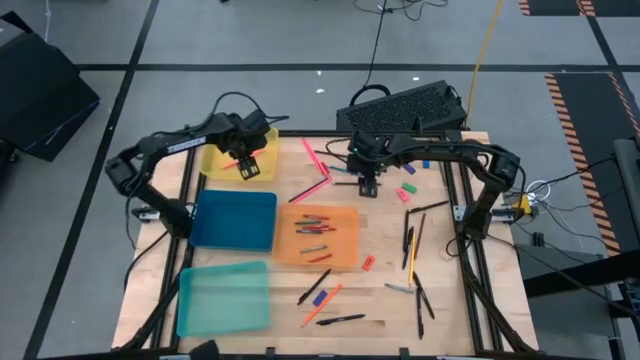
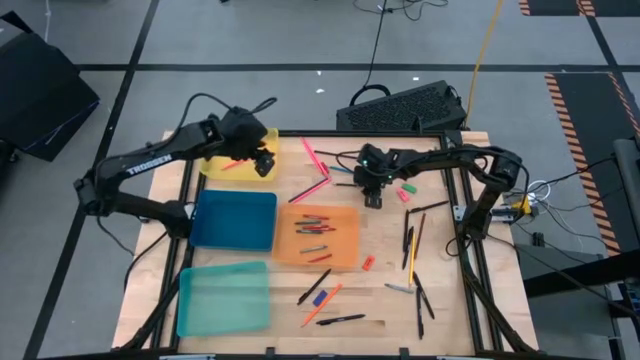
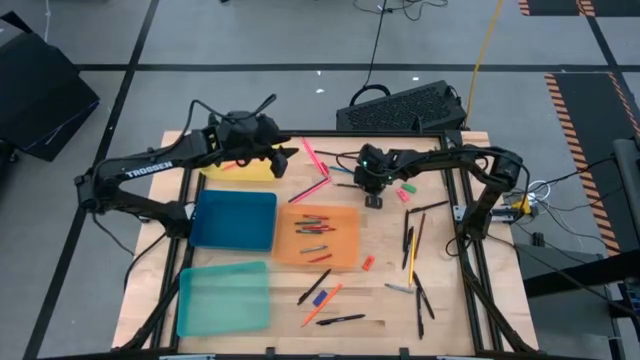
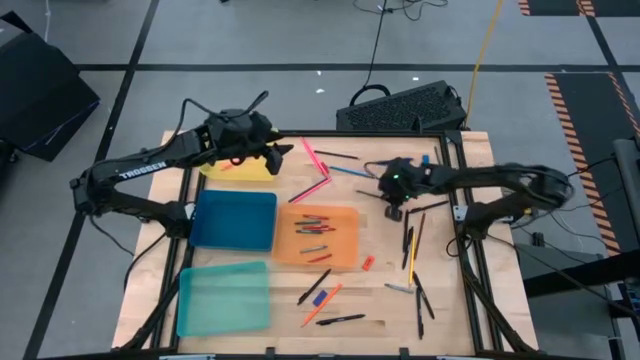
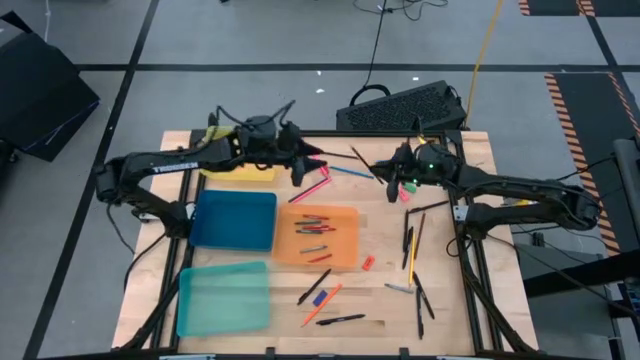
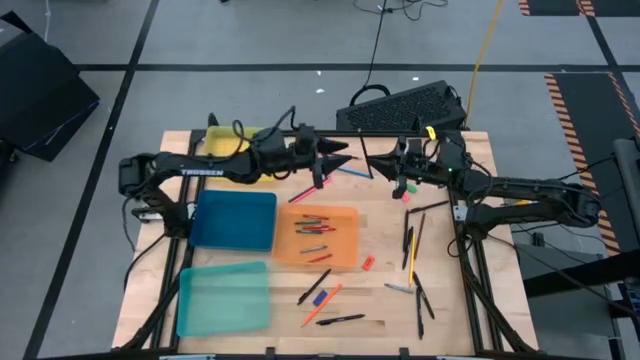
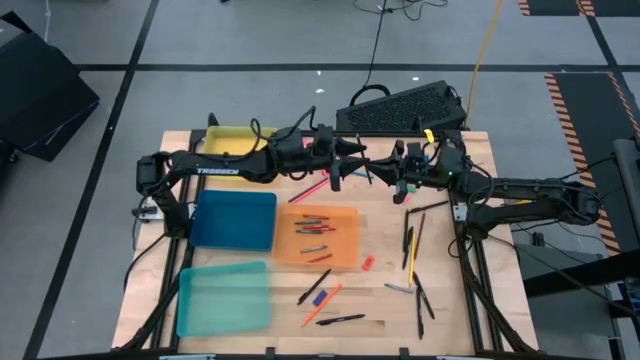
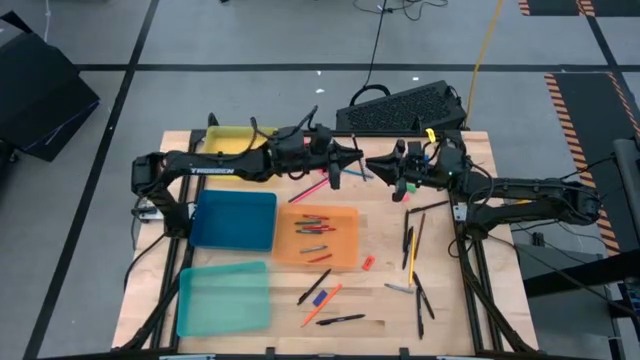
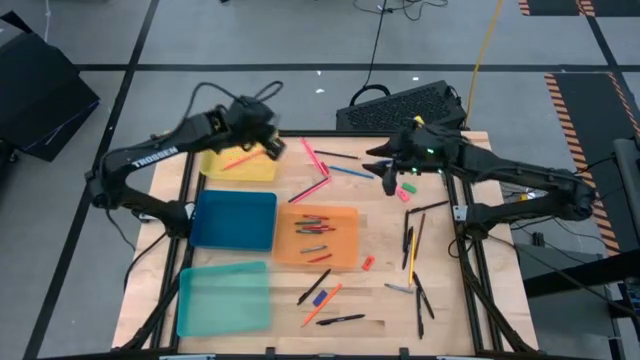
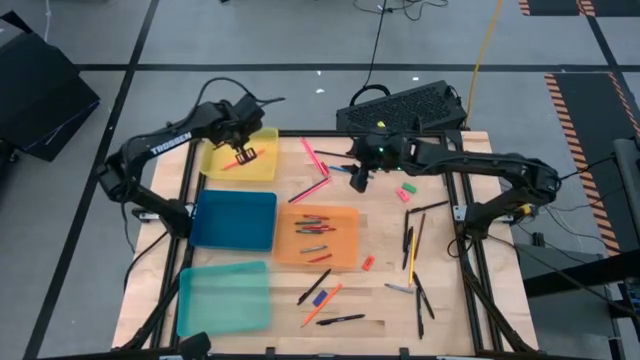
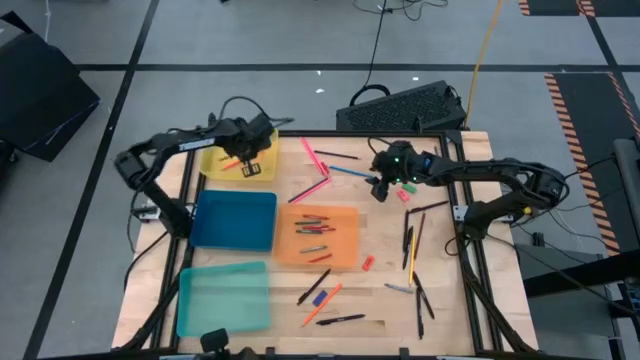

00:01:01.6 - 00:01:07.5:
Task: Sort crayons/erasers/pens/pencils in bins
Put the black pencil into yellow bin

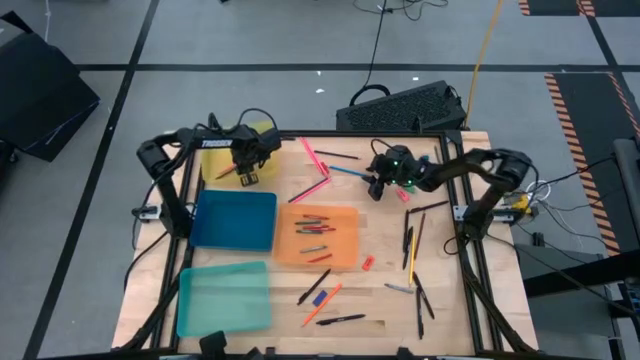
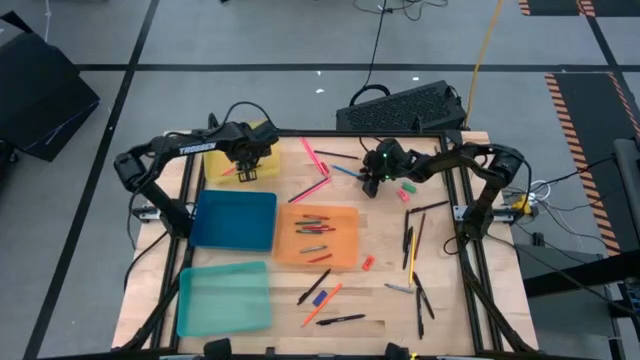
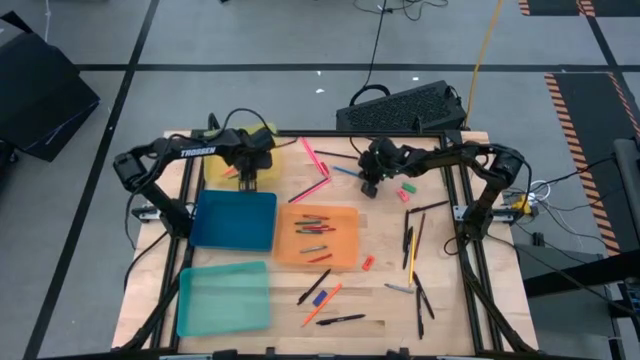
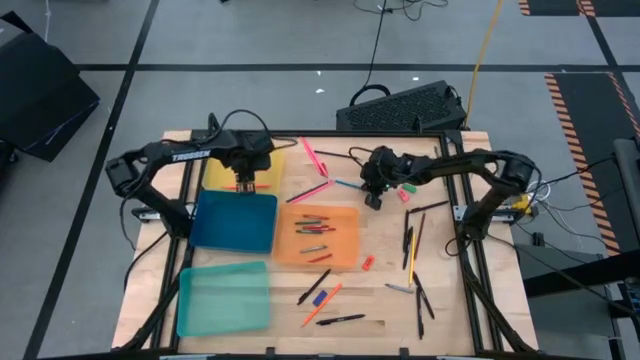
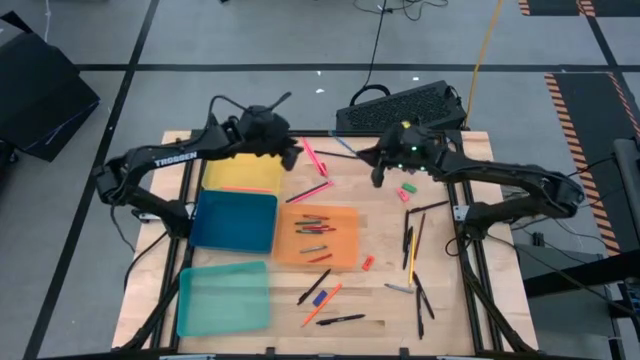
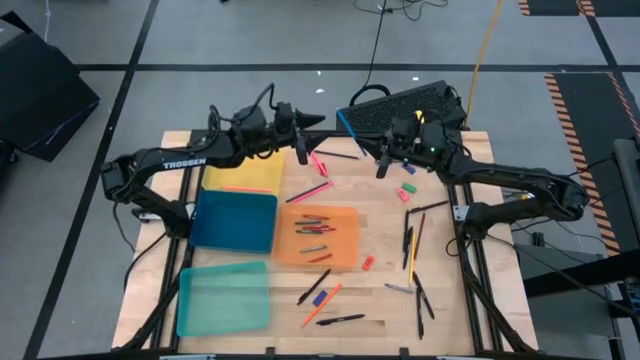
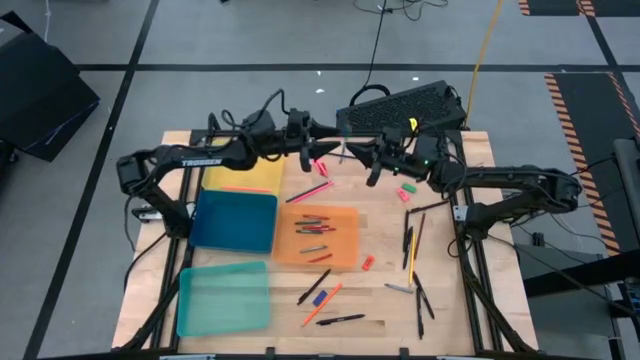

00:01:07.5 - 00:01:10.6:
Put the blue pencil into yellow bin

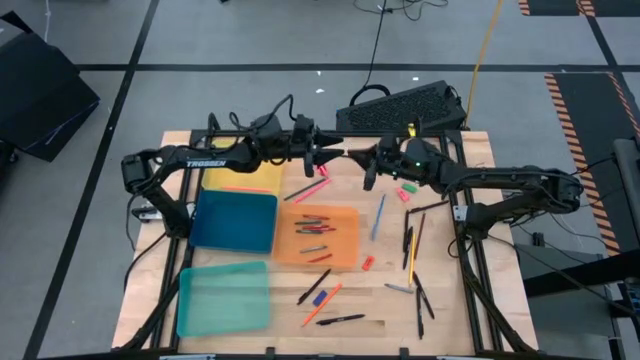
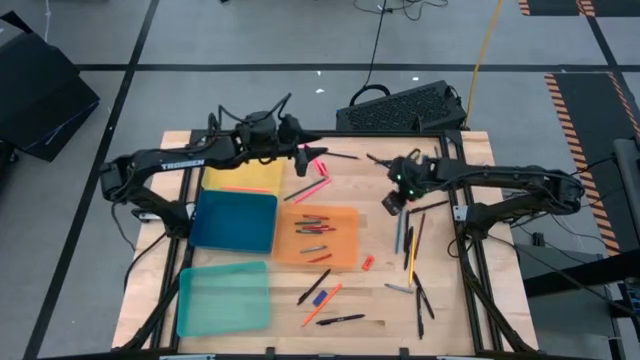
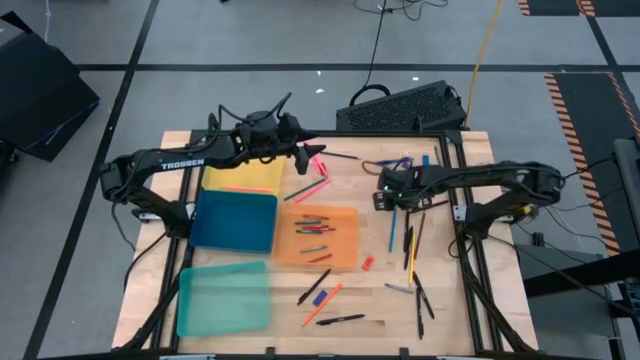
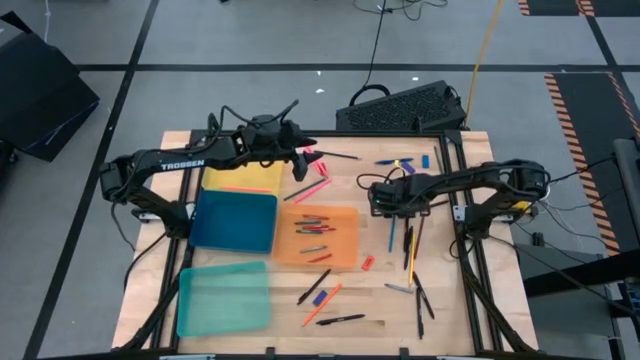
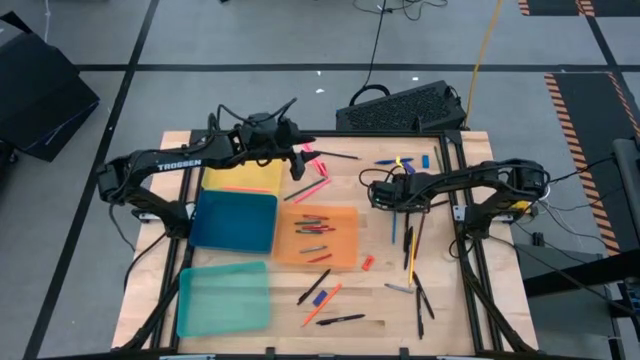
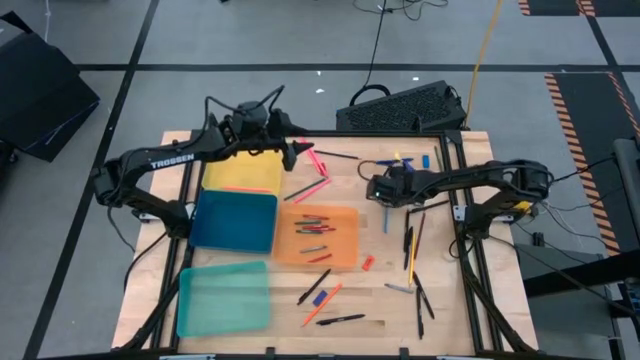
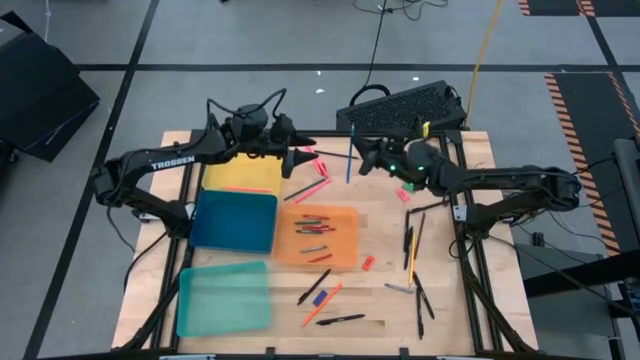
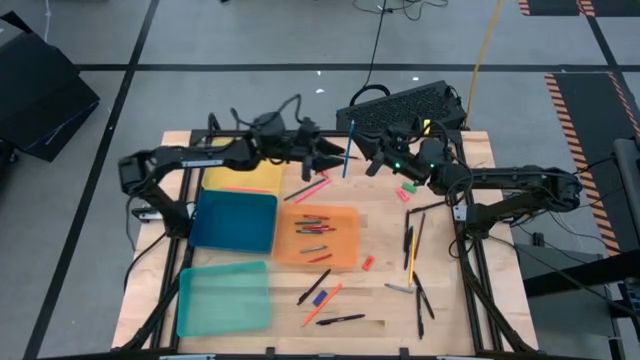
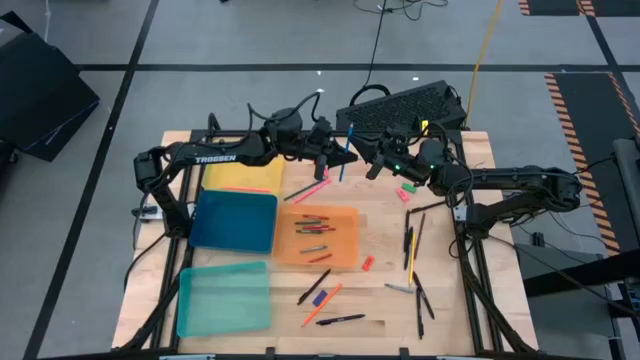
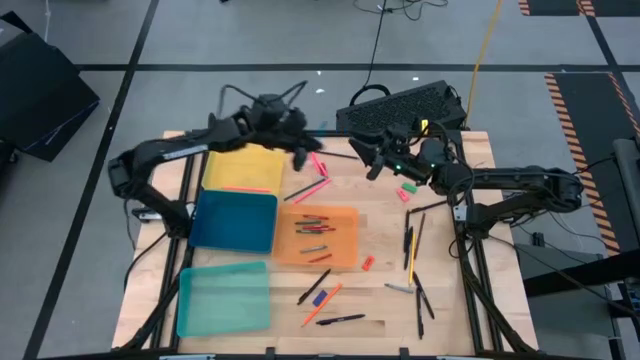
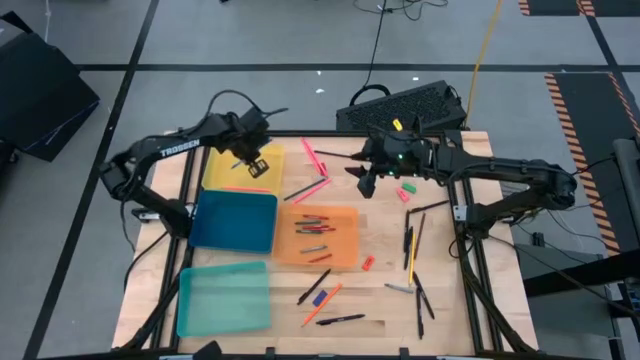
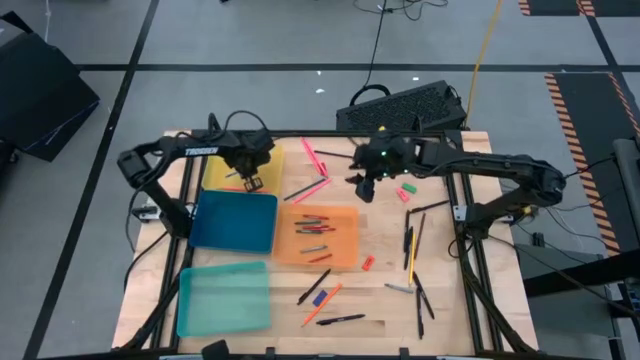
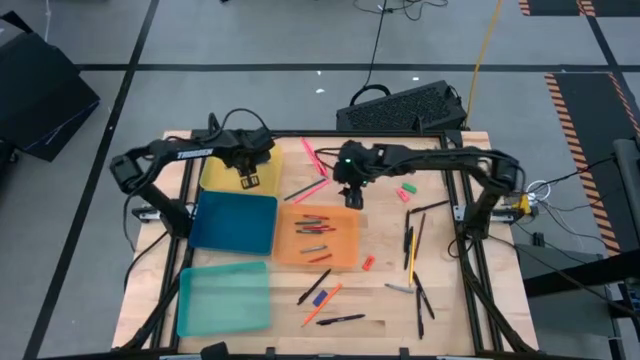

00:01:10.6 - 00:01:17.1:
Put the blue pencil into yellow bin

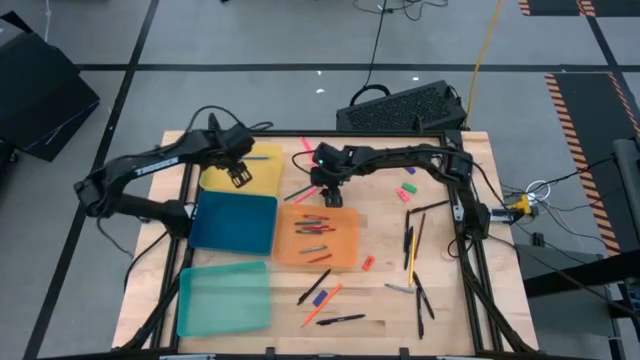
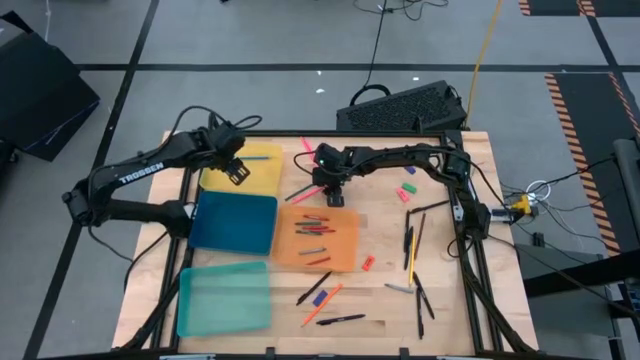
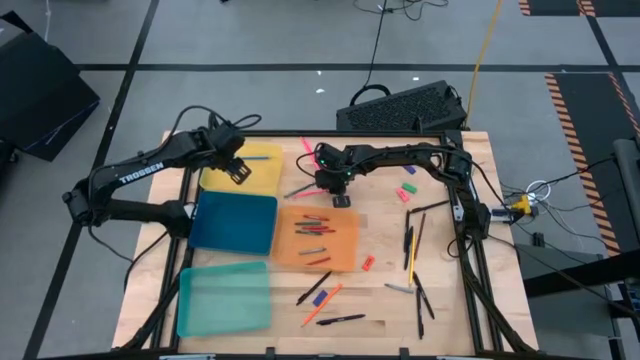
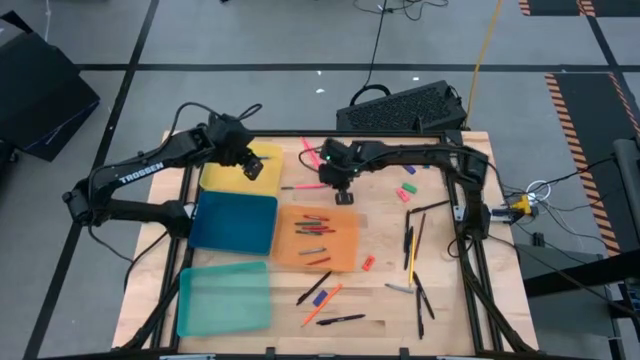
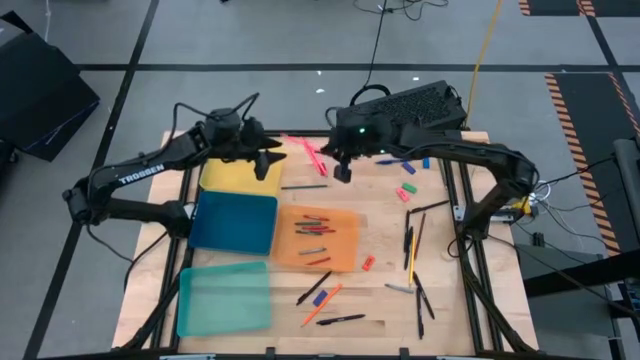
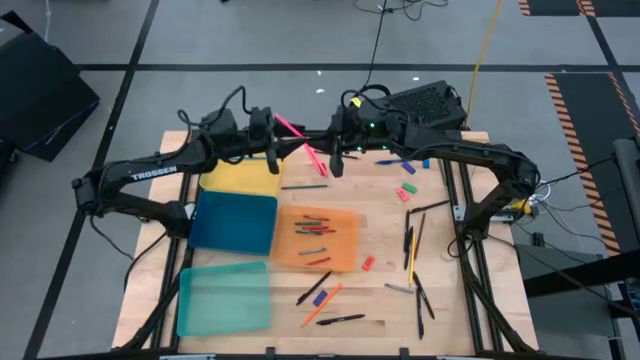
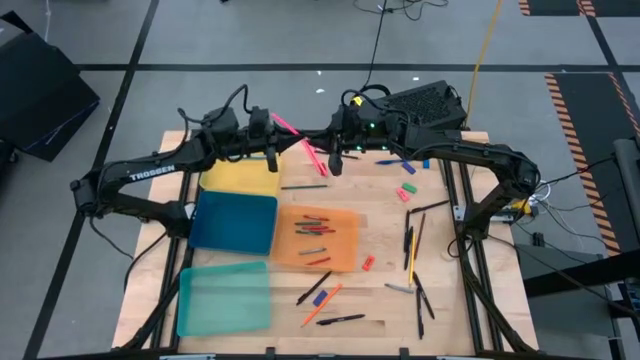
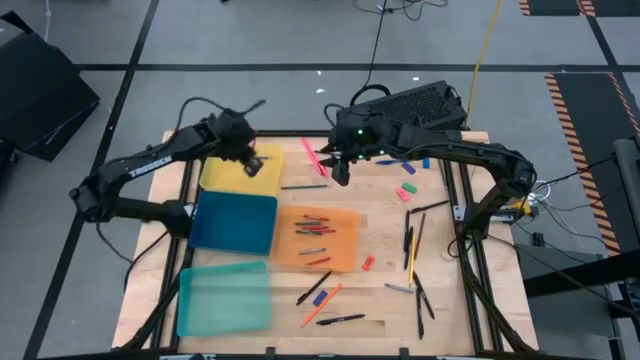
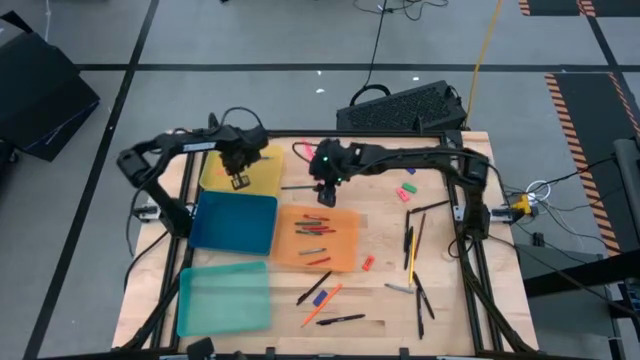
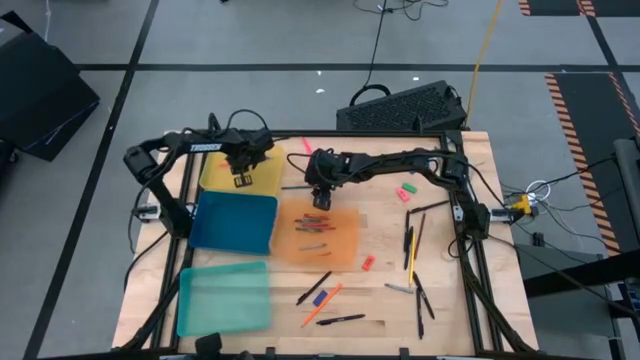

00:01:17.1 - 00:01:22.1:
Put the pink pencil into yellow bin

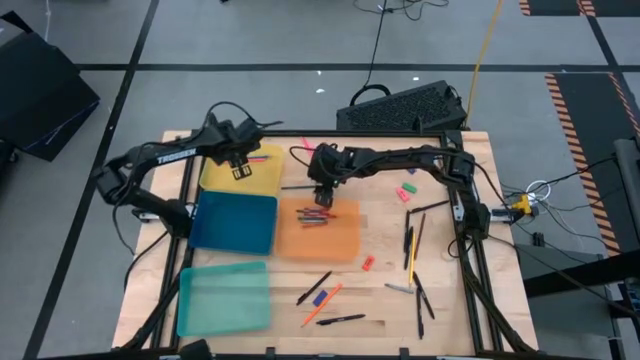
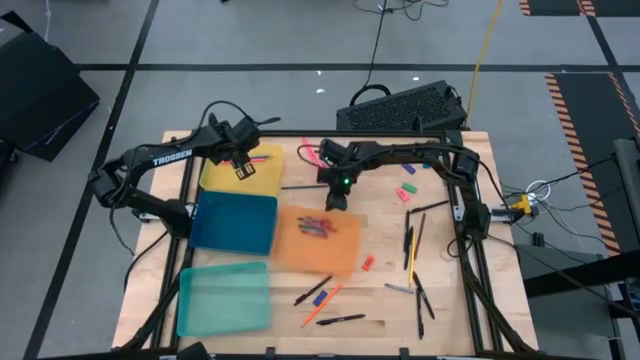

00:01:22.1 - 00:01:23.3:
Adjust the orange bin
